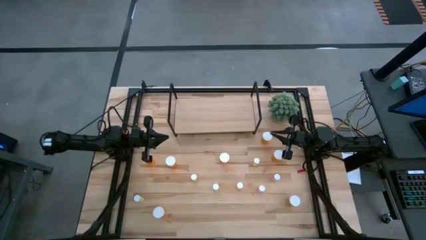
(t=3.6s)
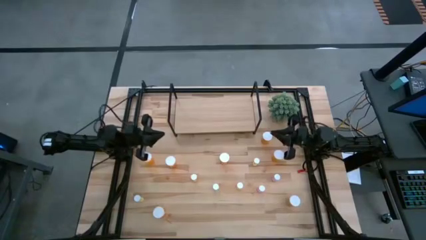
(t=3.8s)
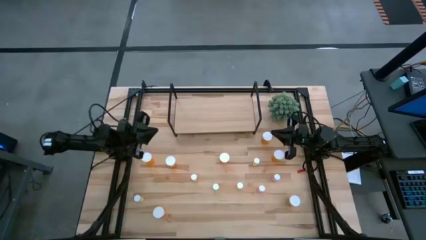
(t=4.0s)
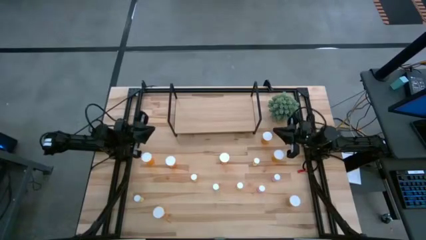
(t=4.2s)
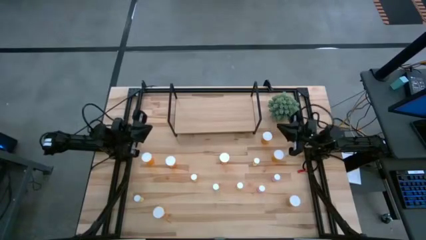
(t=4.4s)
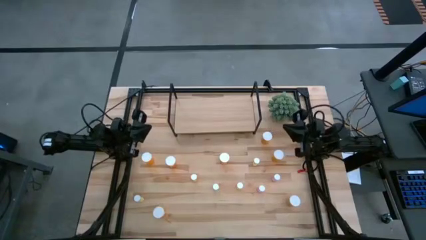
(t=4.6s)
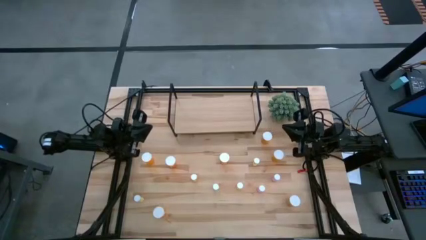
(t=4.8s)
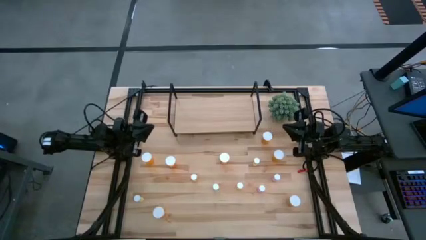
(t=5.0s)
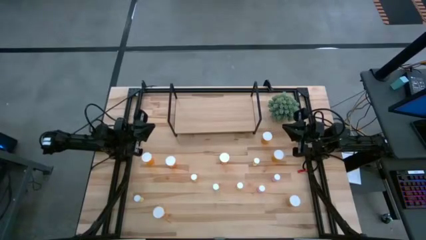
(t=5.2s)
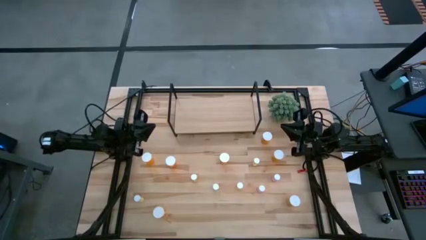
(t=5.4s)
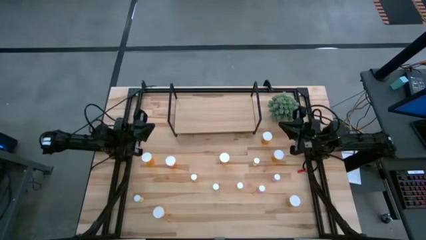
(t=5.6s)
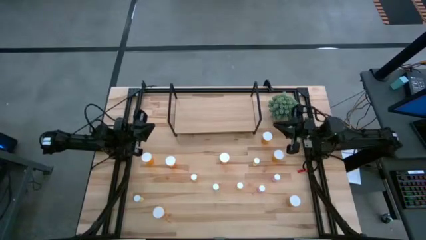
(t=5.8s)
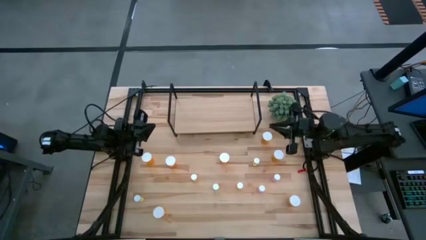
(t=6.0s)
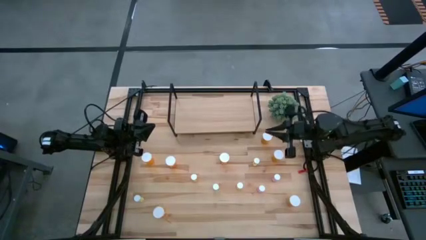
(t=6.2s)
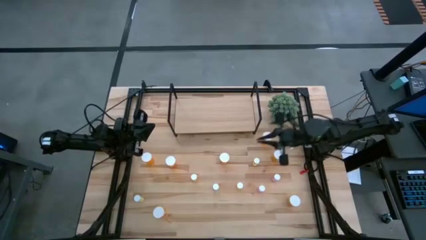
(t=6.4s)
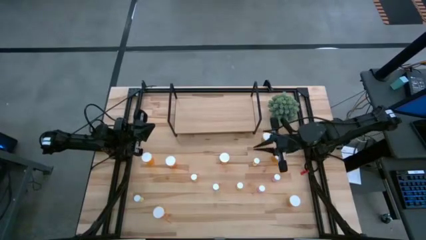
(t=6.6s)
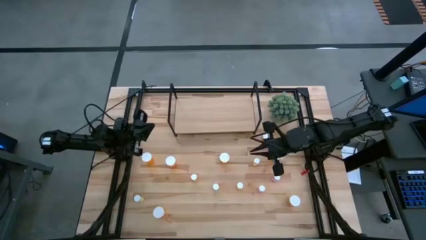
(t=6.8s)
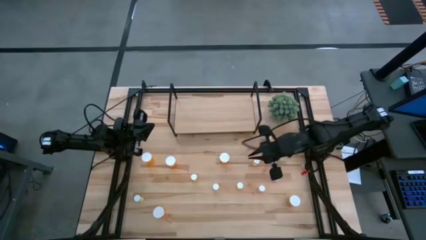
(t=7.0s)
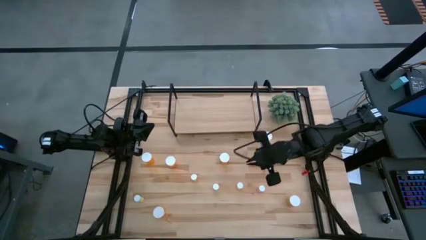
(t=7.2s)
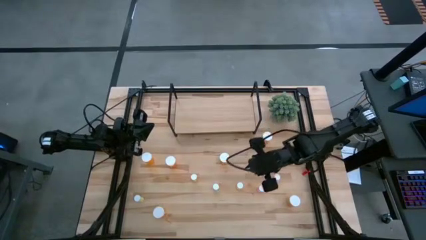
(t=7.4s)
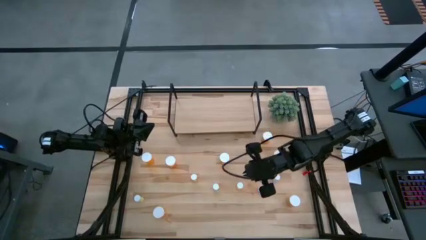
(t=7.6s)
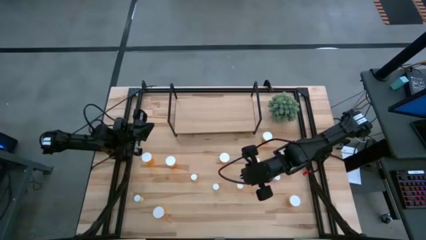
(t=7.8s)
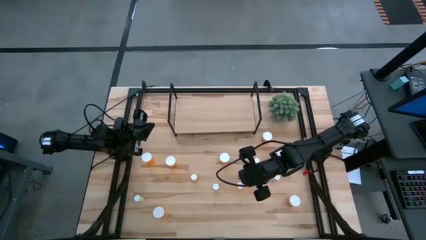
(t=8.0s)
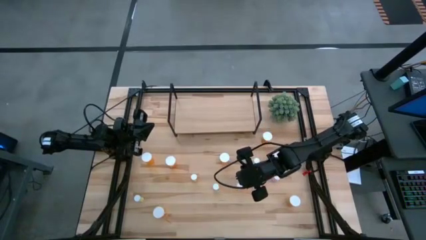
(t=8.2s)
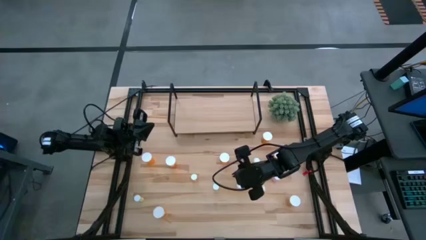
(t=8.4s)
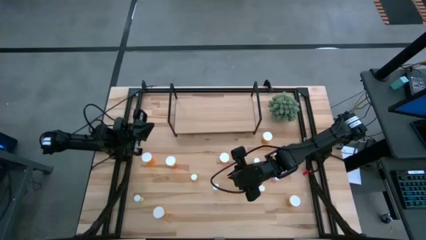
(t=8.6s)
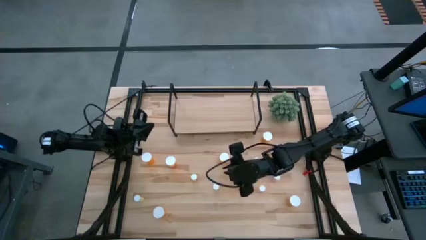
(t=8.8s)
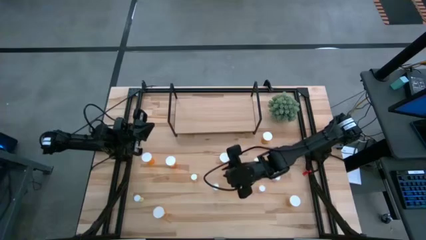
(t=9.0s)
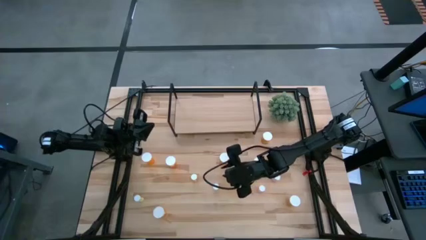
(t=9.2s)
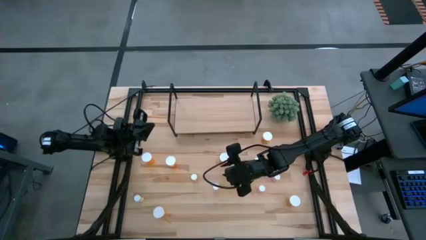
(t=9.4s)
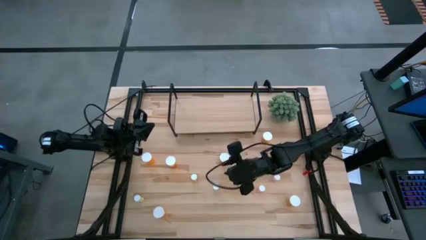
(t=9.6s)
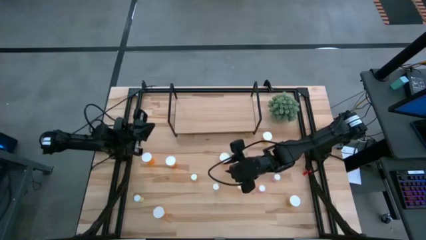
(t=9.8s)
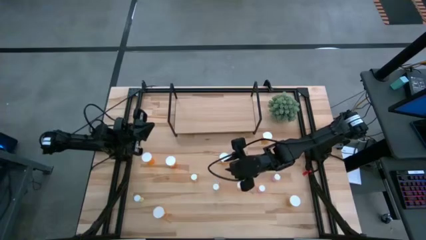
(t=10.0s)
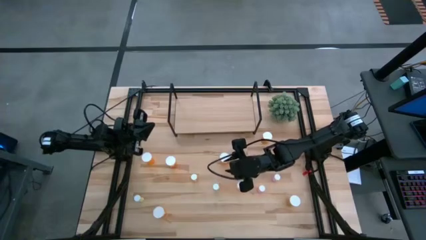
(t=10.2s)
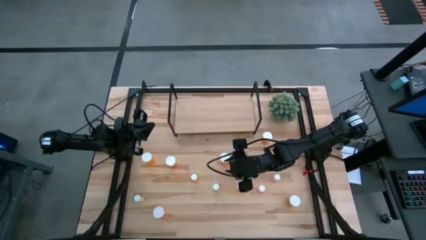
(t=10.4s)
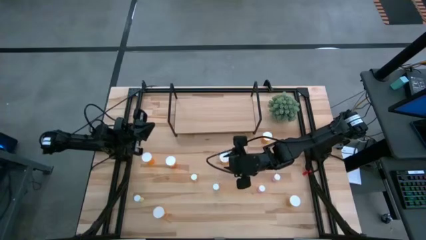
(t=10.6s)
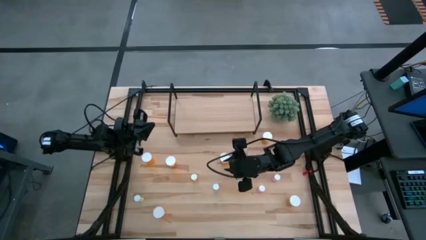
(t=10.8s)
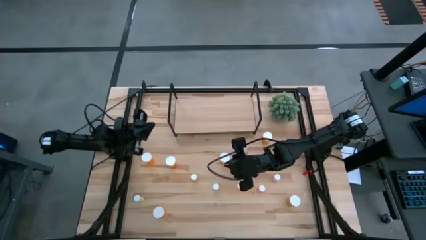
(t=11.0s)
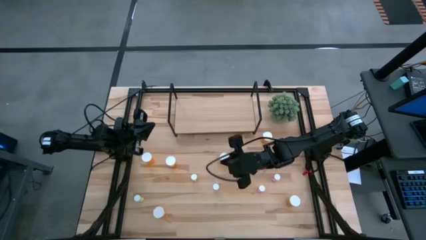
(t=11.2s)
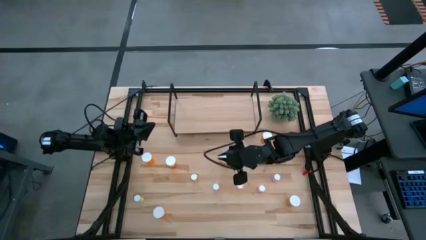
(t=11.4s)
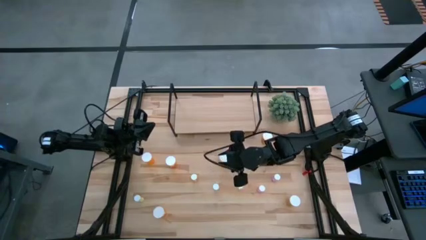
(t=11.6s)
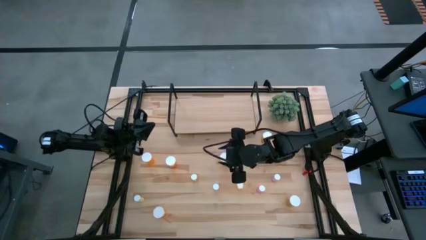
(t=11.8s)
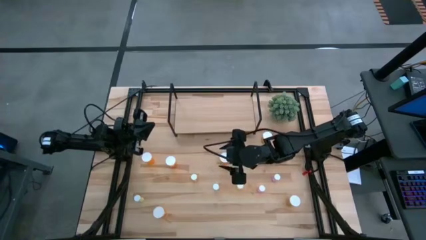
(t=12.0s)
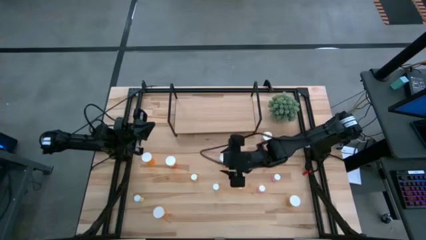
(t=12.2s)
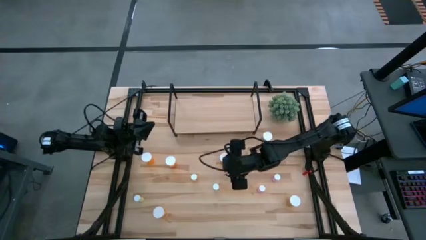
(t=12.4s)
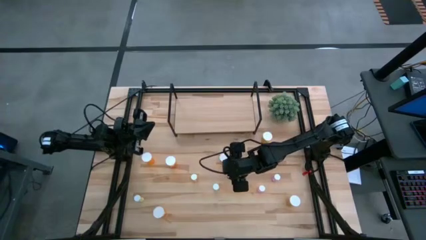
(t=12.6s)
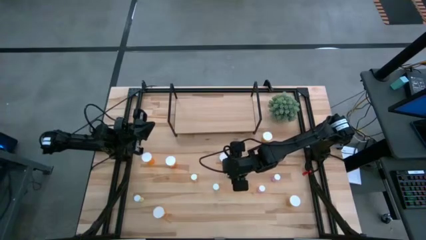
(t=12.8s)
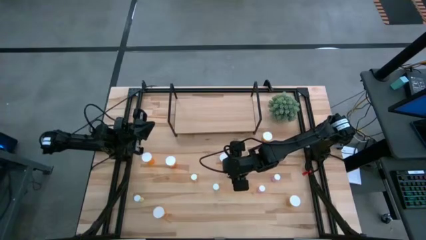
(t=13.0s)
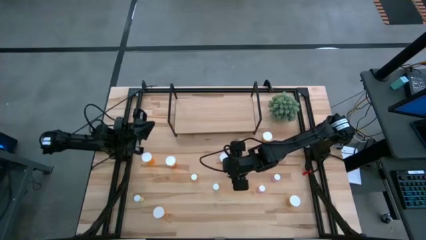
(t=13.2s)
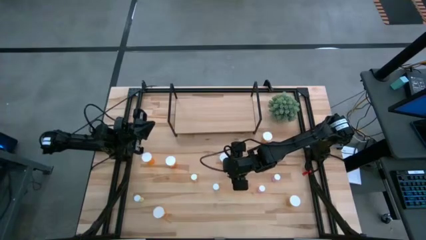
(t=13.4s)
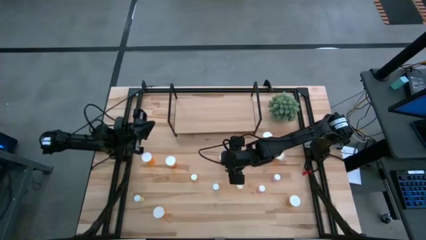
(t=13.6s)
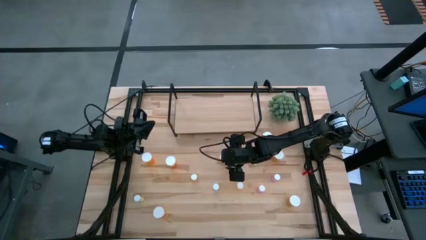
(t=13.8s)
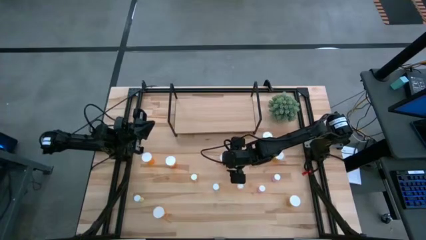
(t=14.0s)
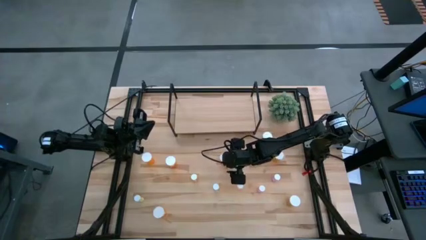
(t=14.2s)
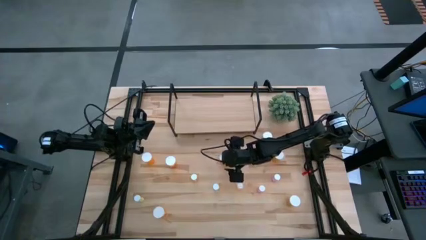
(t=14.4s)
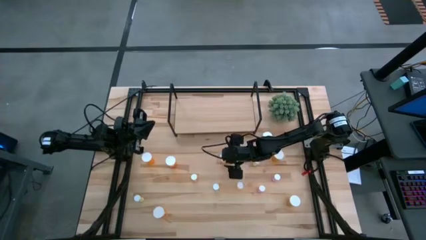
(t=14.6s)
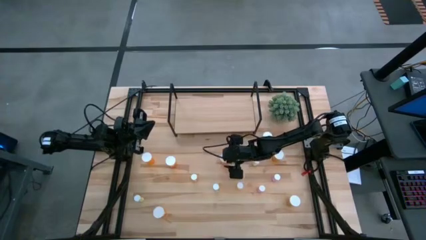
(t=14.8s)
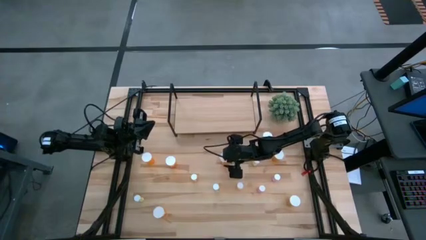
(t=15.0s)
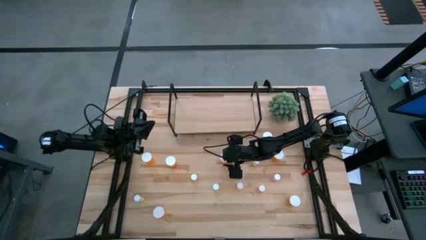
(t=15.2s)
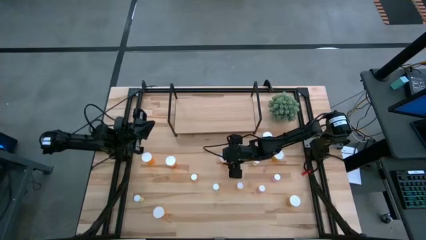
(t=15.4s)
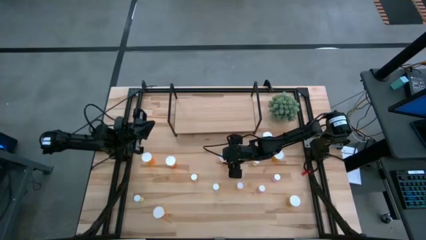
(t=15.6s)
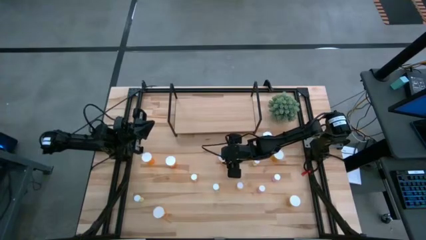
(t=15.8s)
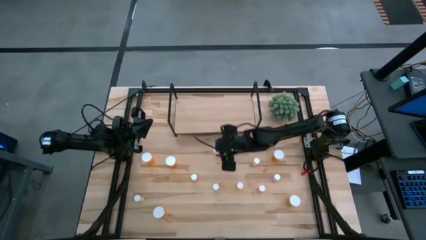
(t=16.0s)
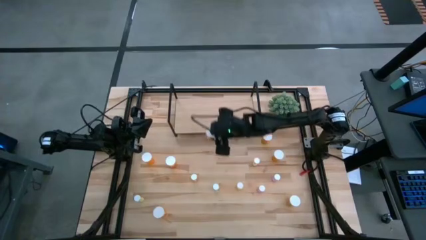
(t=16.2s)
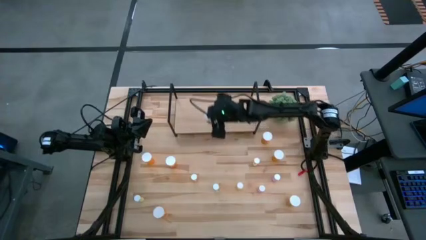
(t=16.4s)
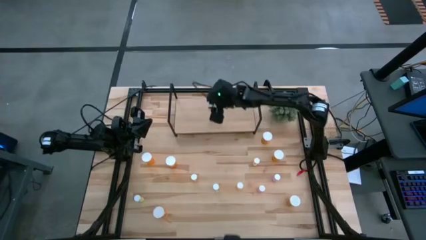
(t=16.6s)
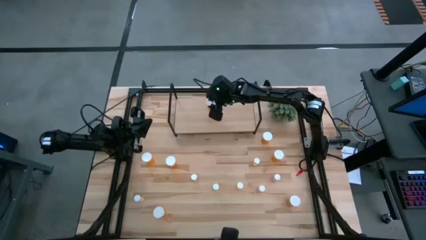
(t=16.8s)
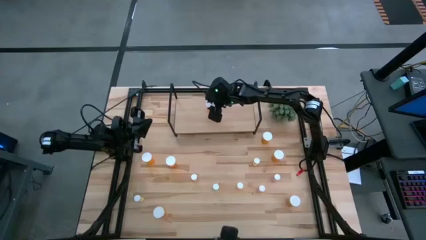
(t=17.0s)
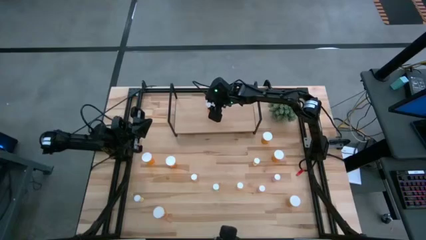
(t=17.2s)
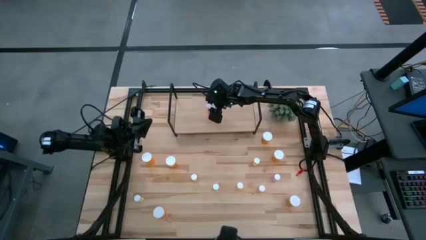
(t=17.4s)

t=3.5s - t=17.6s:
Task: Pick and place medicine bottles onto shelf by color
Put the large orange pill bottle on the shelf
